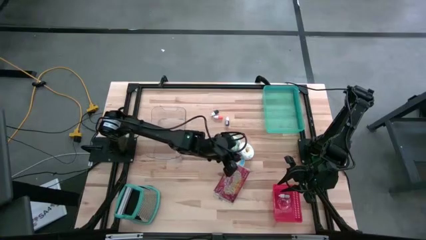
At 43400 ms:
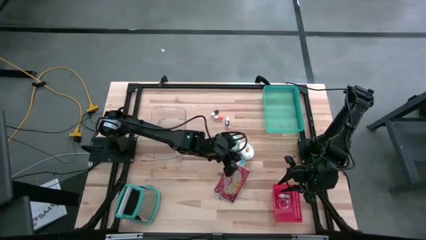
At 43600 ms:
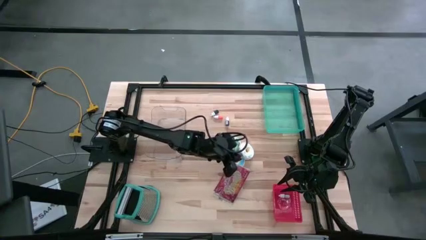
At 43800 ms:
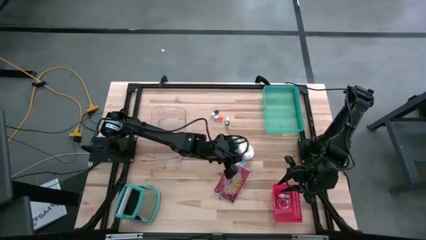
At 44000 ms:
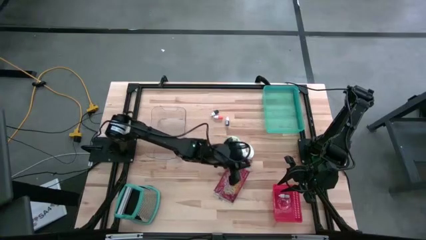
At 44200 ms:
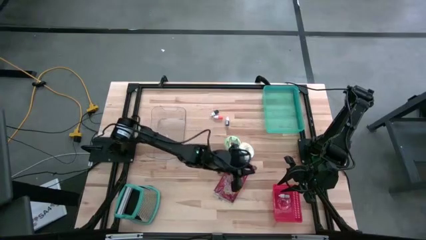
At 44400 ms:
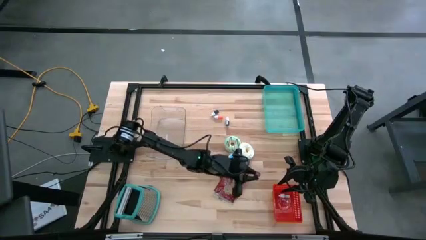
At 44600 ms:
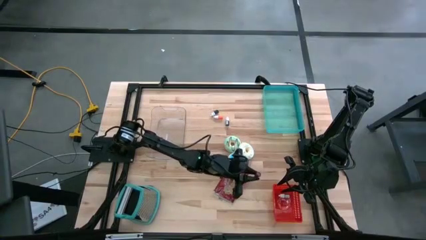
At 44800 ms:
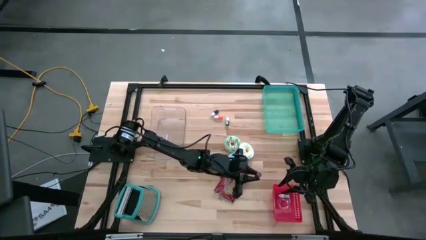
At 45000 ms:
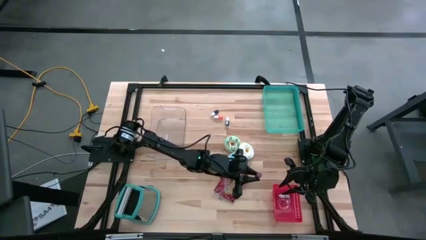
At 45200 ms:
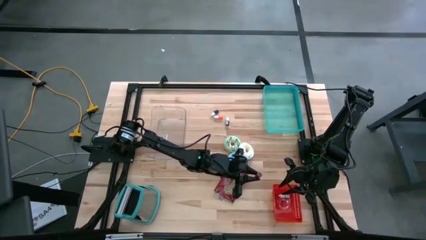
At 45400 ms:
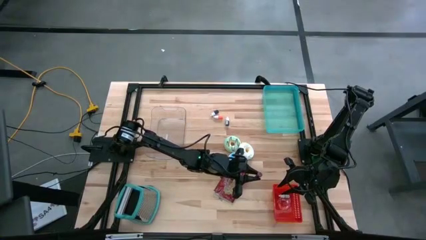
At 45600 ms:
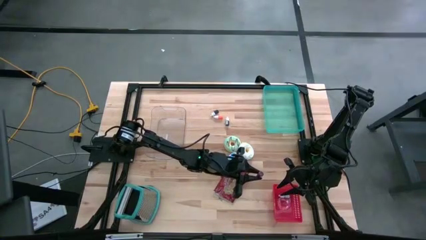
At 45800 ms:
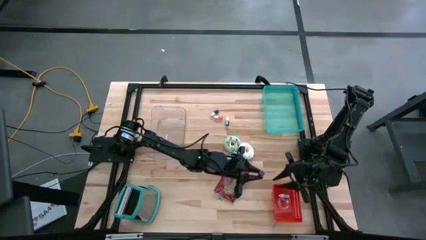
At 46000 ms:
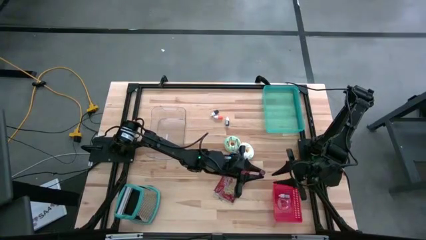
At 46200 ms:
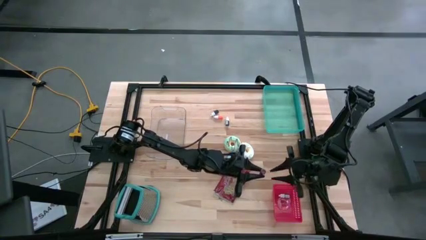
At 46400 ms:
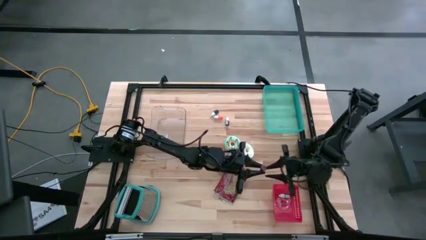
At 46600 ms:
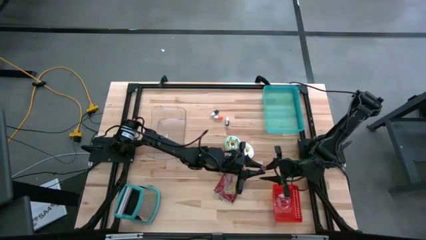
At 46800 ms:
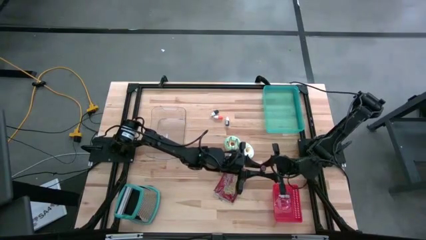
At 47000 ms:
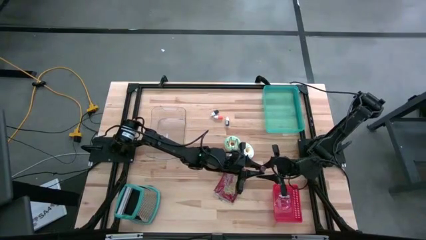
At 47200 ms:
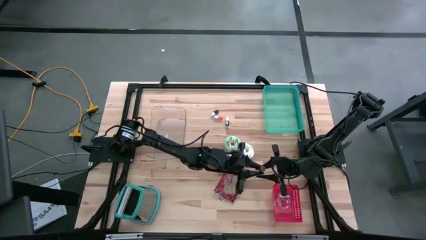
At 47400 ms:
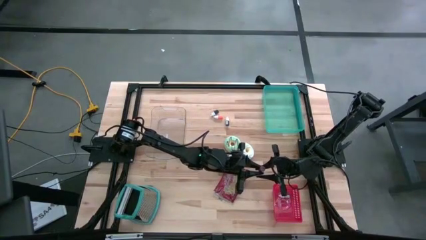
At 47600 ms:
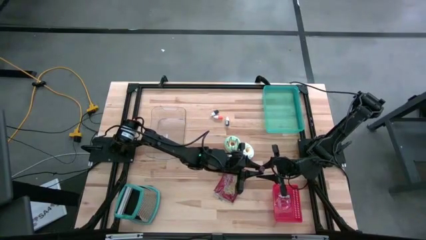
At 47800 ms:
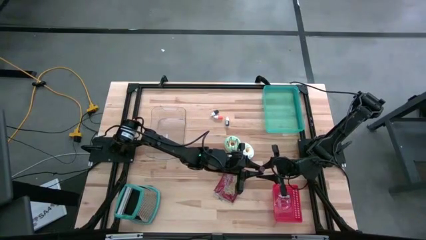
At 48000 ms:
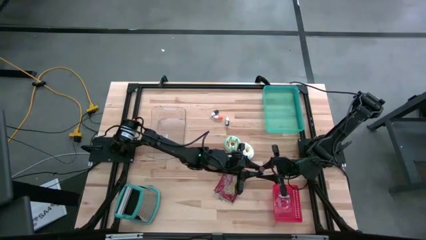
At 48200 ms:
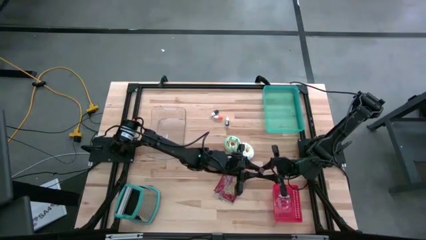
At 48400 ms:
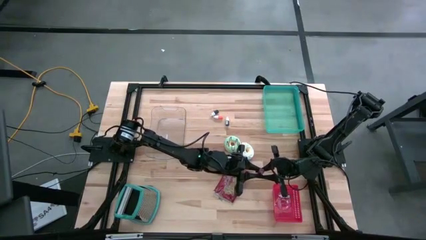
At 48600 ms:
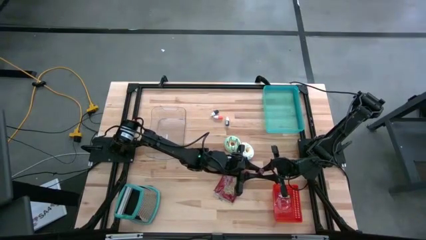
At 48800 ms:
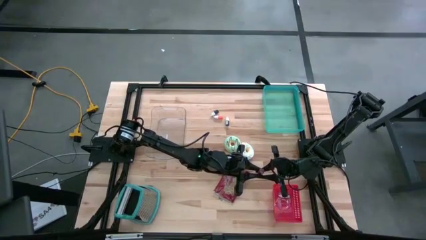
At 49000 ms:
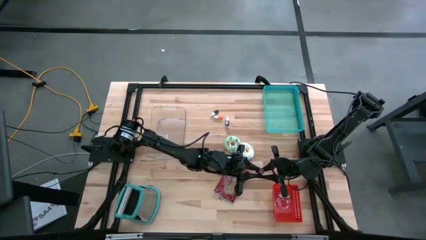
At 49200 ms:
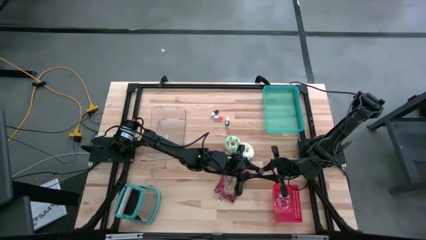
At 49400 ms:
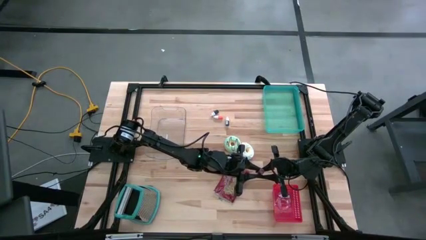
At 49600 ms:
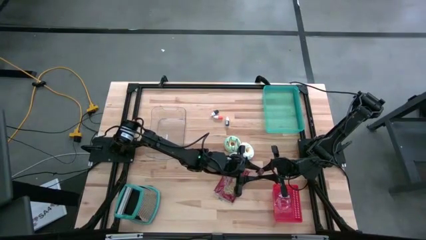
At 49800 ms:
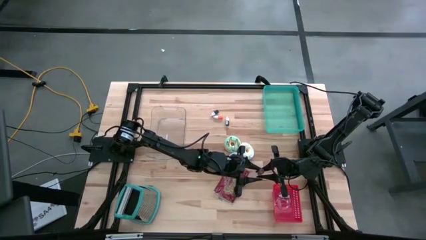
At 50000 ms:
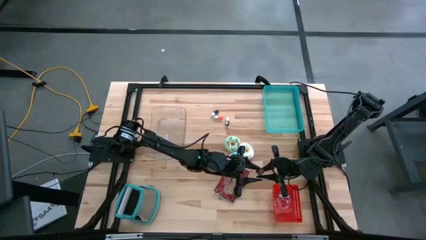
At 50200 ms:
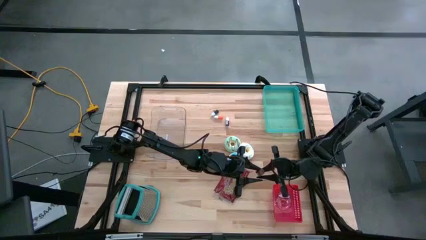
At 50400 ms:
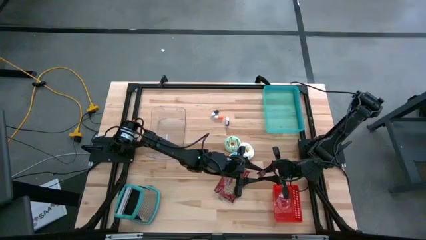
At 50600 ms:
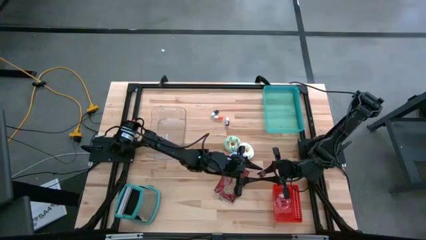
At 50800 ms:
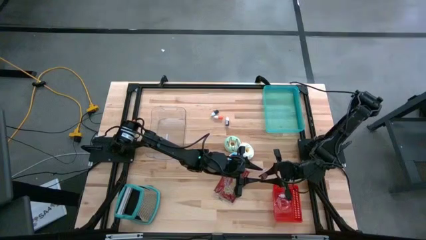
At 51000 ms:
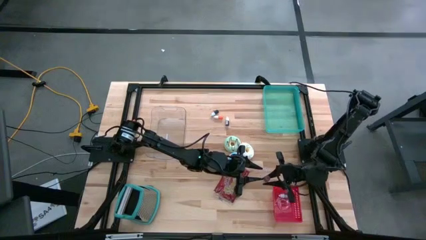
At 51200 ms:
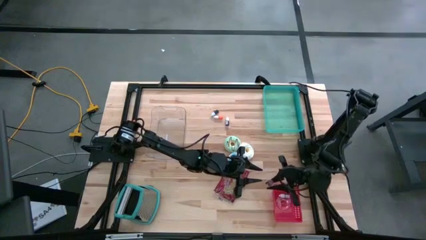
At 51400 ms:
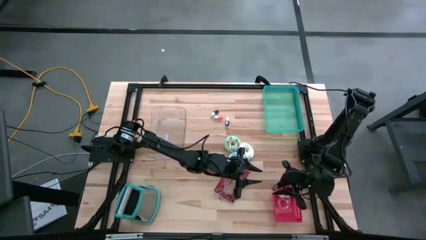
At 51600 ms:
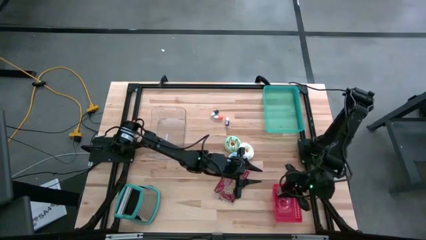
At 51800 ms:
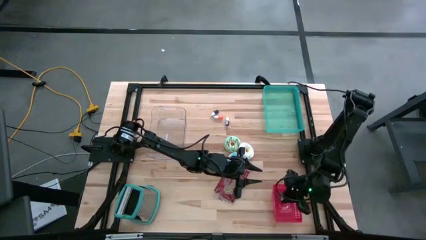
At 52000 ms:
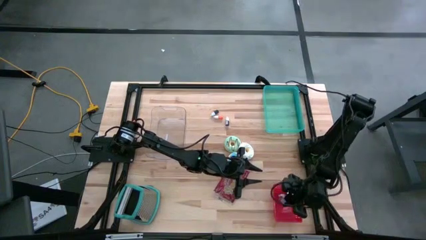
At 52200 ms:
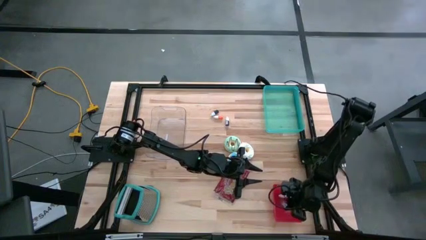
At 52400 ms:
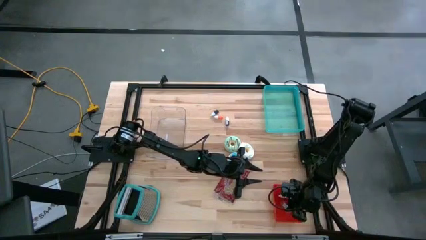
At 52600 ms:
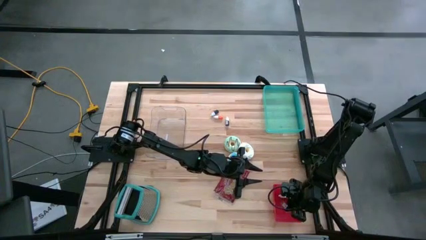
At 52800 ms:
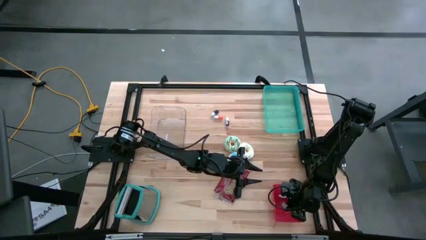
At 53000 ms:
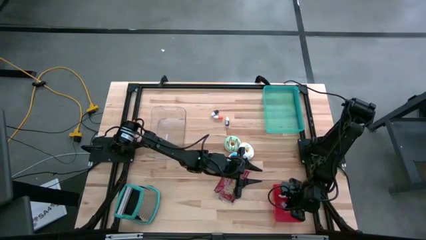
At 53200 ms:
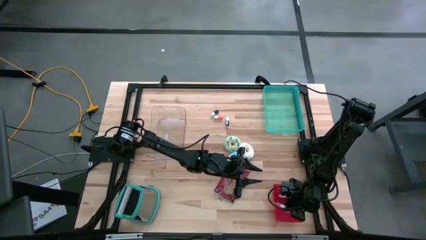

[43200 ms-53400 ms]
Put the red food coloring bottle into the red bin
